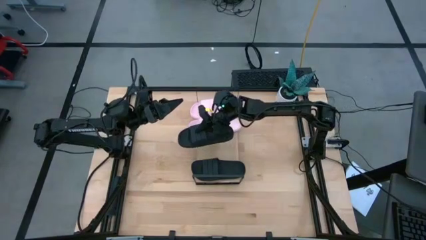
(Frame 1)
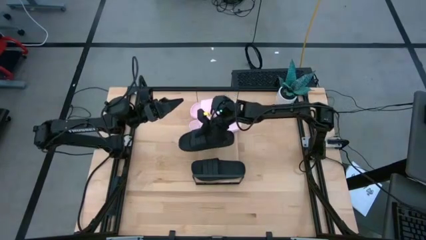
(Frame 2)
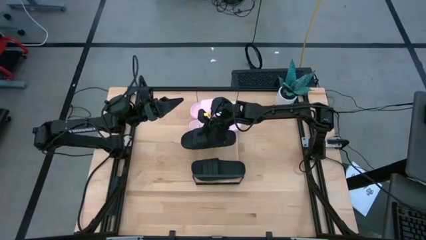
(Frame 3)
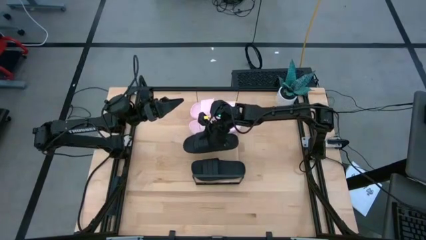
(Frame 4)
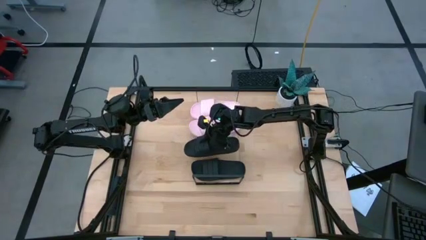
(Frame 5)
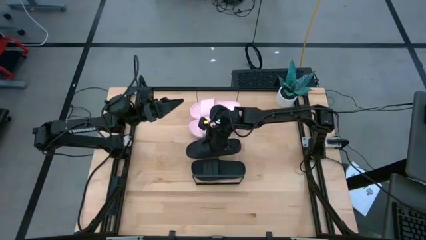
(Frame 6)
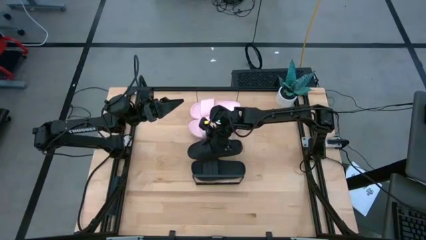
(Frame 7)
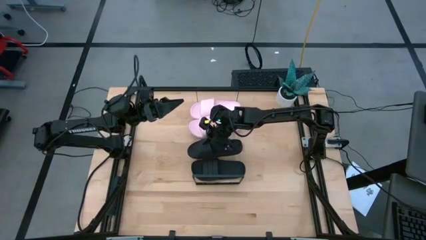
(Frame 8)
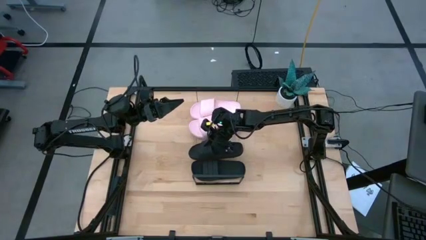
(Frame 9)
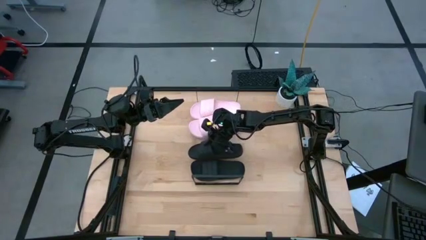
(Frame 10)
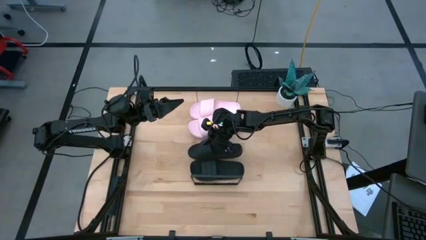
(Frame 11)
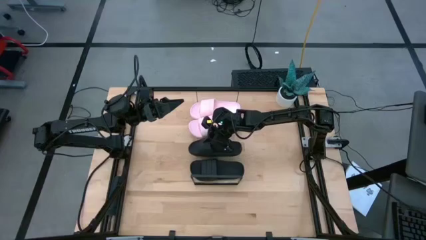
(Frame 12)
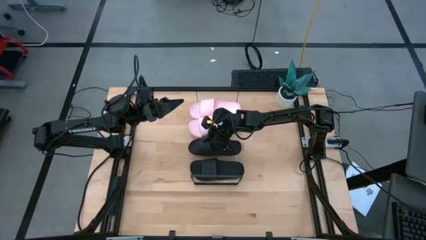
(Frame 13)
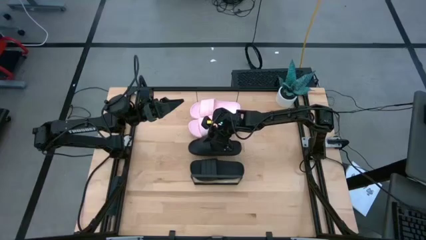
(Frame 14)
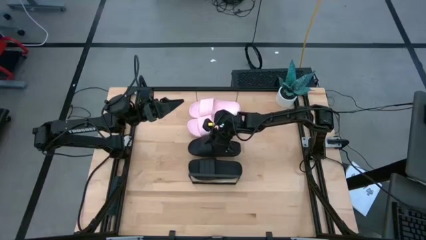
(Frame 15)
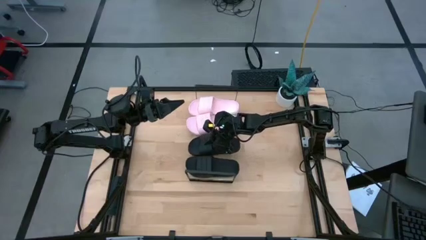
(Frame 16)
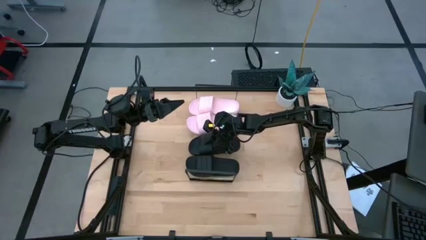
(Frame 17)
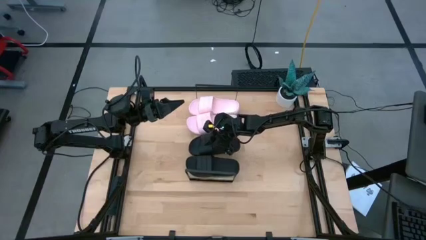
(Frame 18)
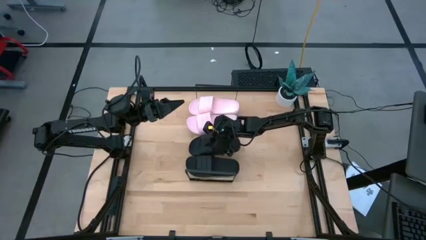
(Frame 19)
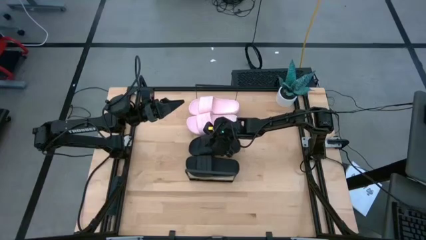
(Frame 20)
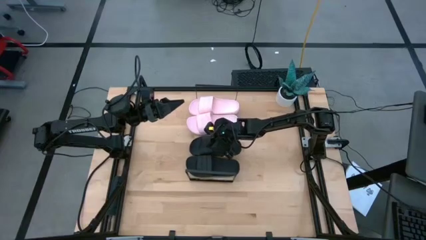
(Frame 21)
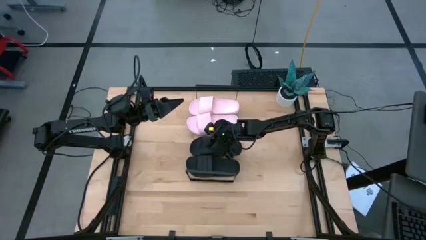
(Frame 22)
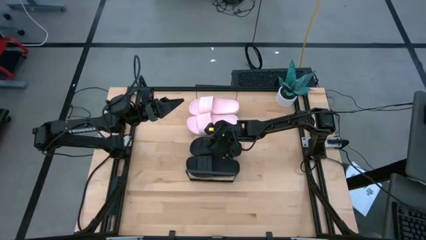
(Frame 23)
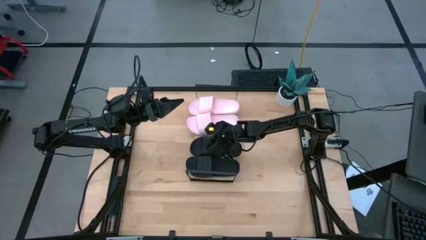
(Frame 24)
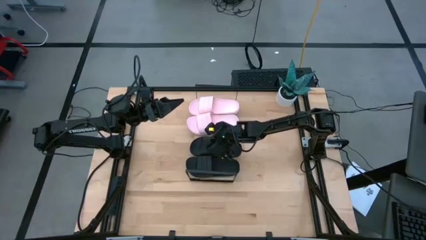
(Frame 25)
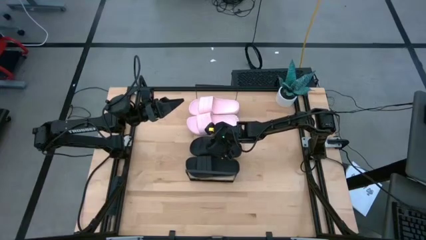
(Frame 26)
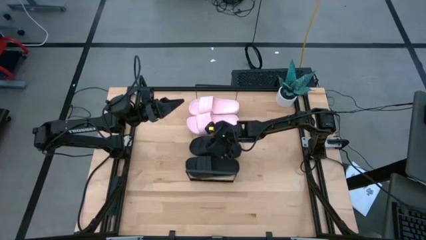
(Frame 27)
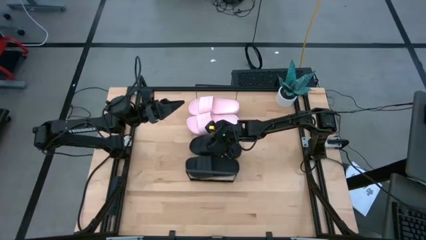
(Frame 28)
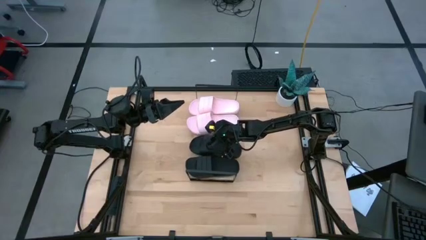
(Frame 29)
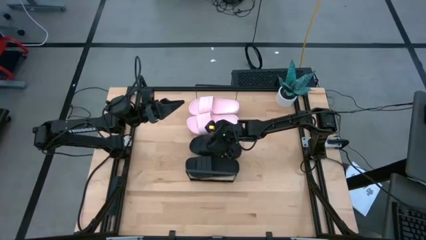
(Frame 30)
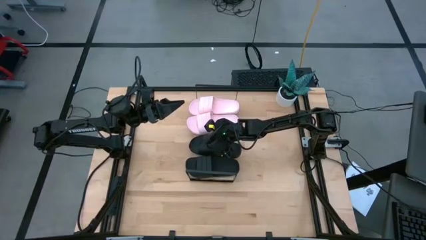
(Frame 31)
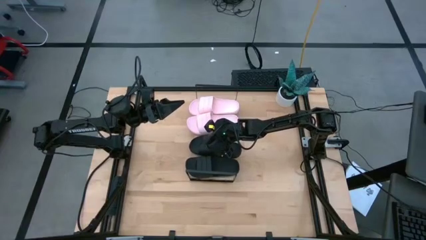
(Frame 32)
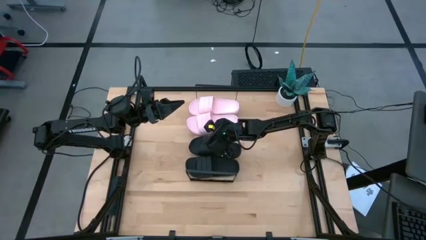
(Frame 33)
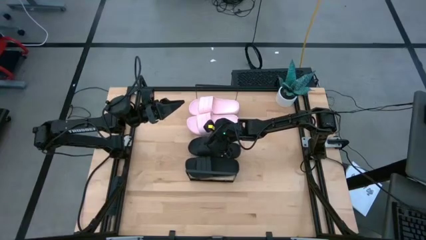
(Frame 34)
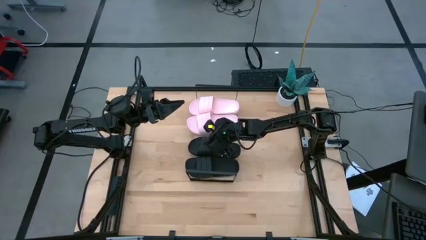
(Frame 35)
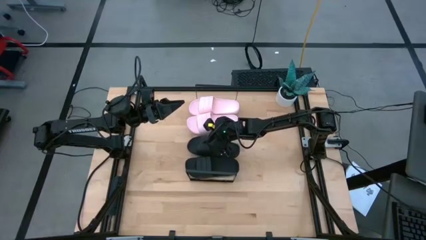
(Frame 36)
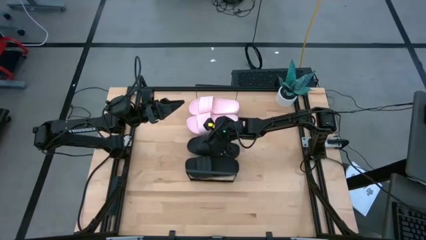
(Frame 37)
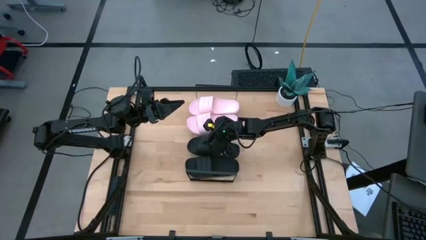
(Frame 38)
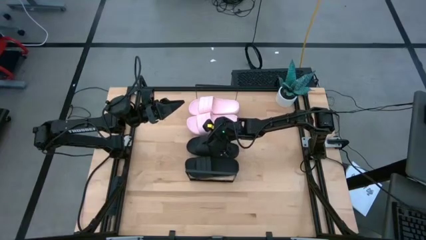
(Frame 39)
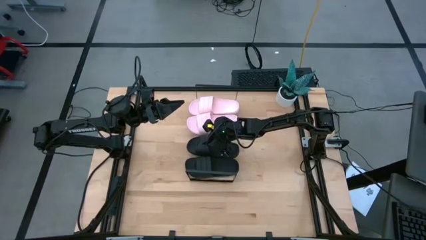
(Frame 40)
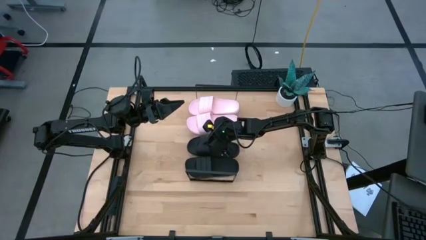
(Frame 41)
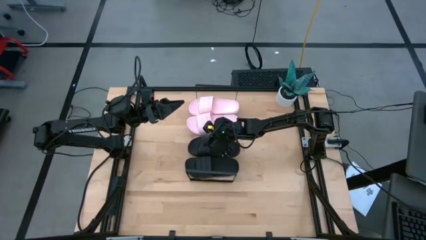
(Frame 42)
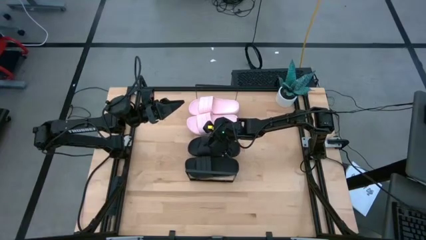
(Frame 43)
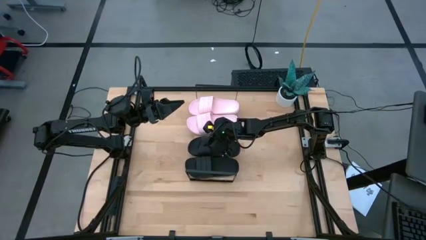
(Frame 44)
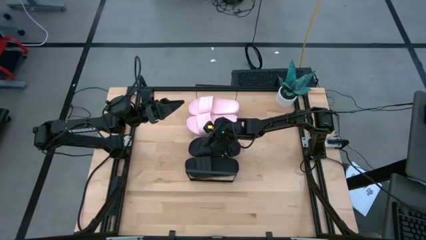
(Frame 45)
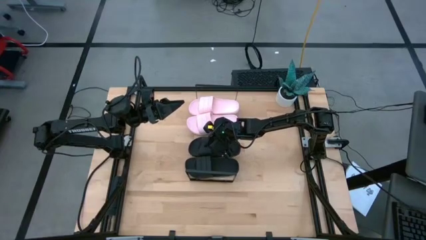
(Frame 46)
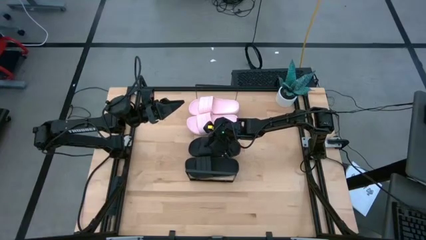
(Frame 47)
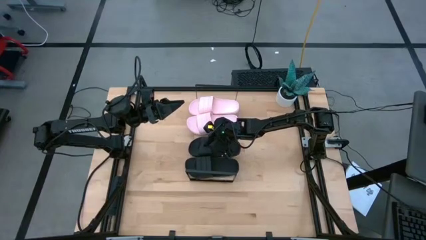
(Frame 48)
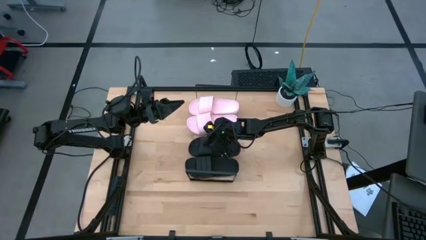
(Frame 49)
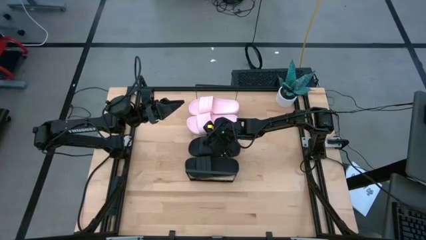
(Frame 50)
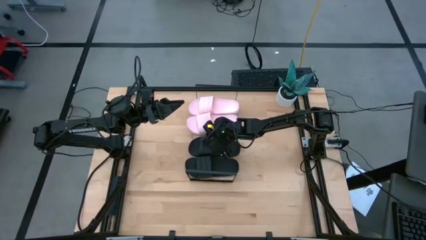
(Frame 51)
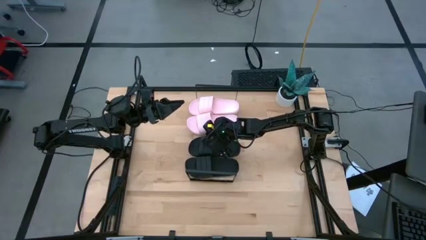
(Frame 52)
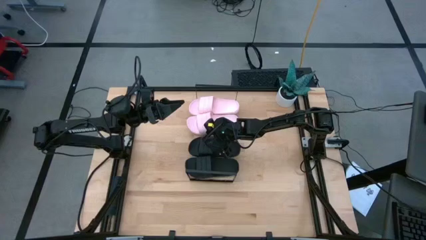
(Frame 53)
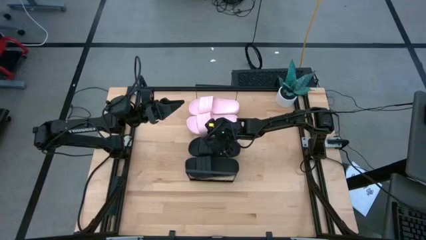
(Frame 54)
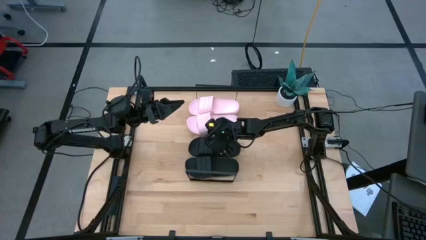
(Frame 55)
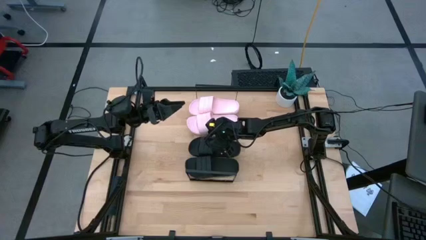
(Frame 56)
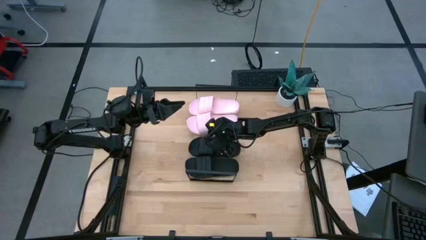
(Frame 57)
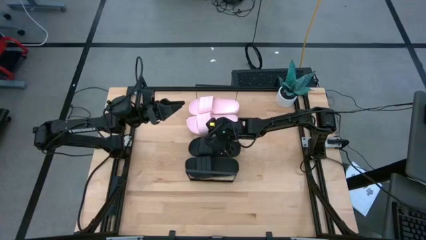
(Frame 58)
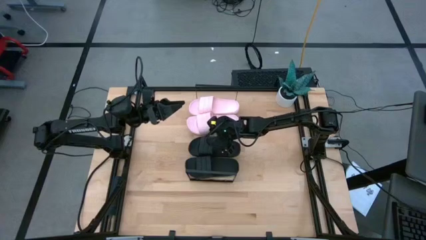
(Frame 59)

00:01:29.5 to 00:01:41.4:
Task: Pick and place slides into the shelf
Put the black slide on the shelf

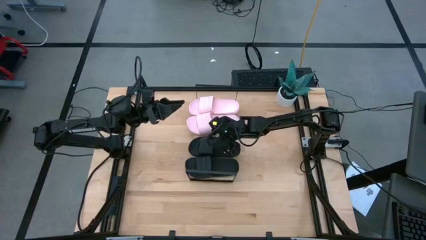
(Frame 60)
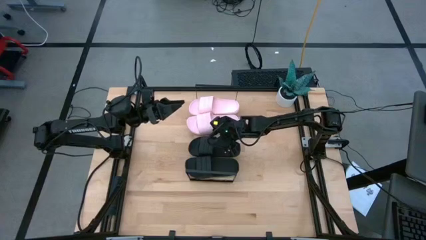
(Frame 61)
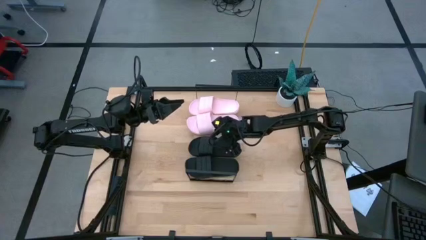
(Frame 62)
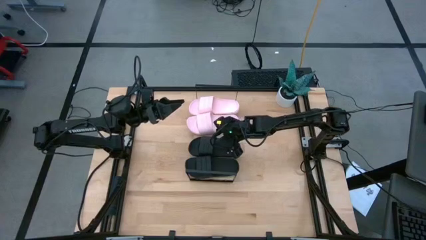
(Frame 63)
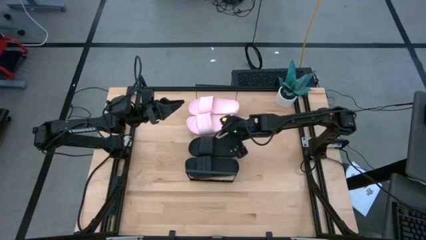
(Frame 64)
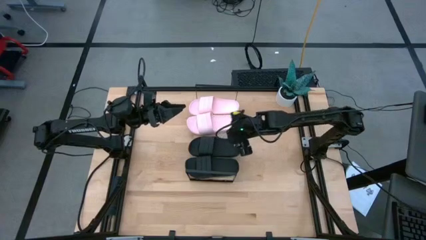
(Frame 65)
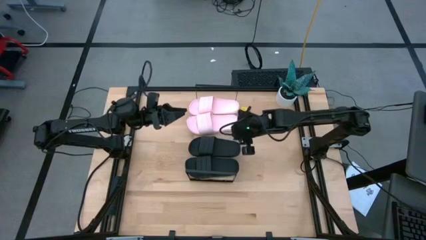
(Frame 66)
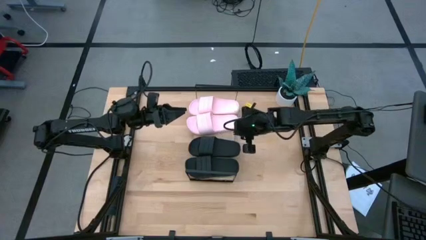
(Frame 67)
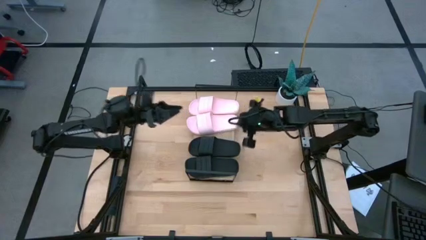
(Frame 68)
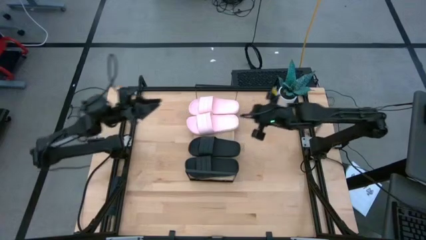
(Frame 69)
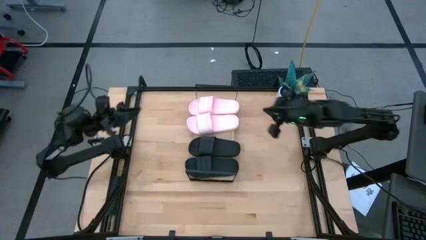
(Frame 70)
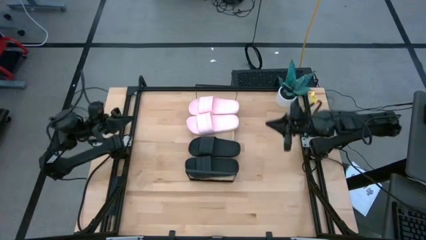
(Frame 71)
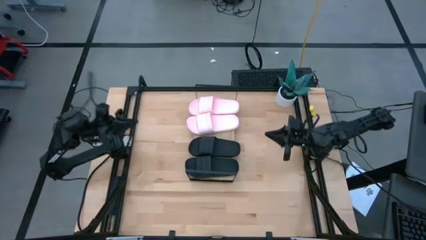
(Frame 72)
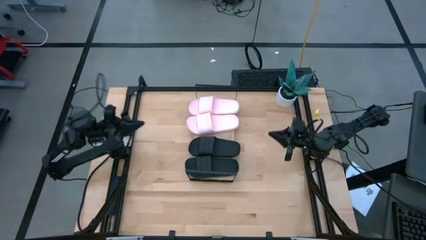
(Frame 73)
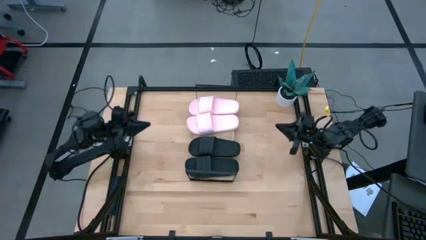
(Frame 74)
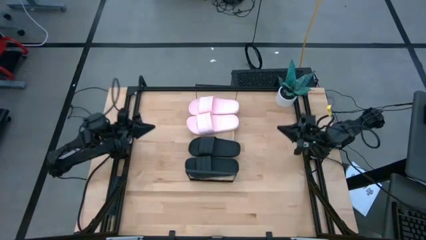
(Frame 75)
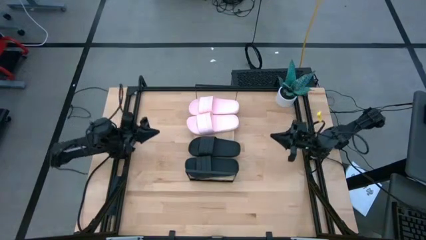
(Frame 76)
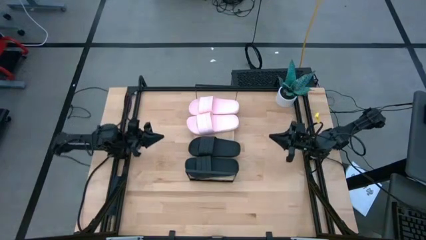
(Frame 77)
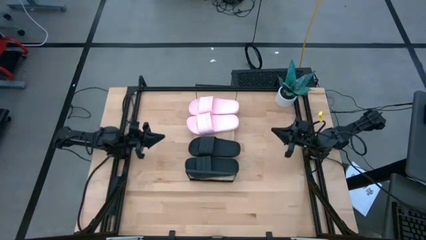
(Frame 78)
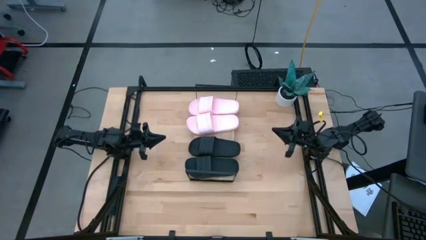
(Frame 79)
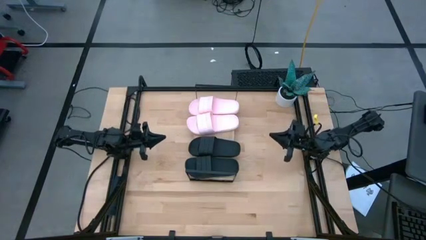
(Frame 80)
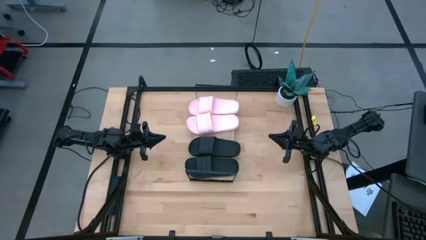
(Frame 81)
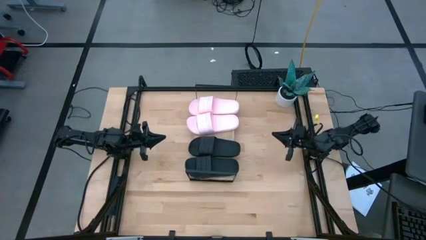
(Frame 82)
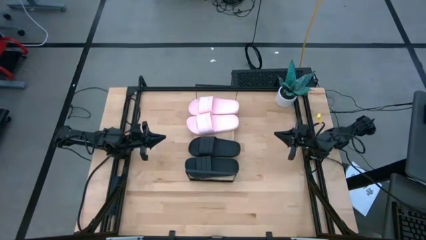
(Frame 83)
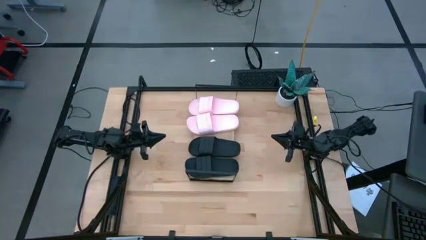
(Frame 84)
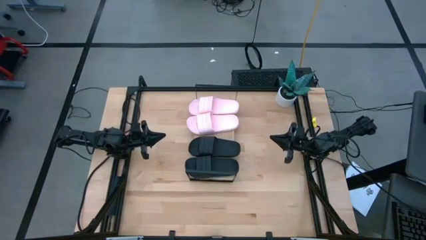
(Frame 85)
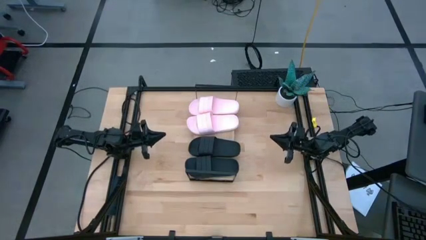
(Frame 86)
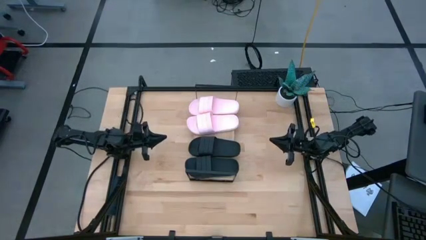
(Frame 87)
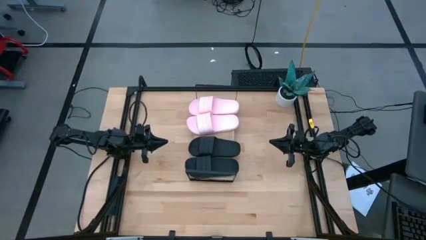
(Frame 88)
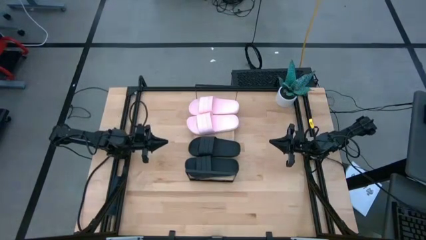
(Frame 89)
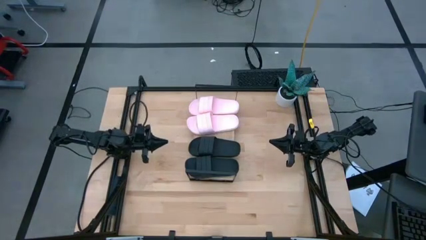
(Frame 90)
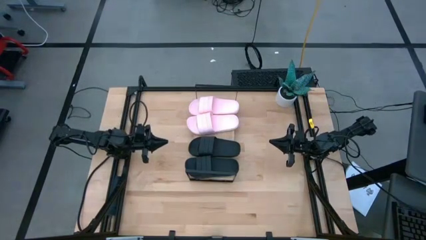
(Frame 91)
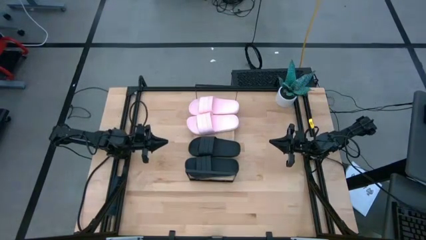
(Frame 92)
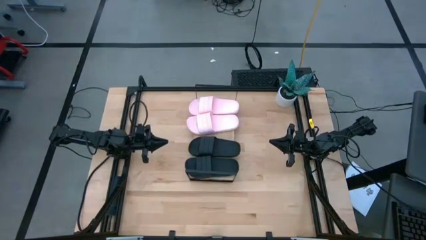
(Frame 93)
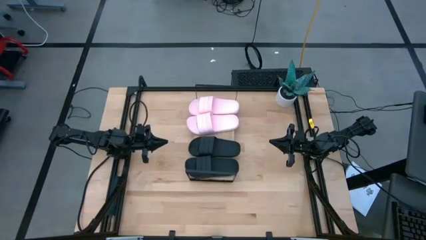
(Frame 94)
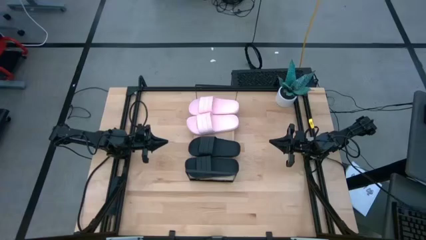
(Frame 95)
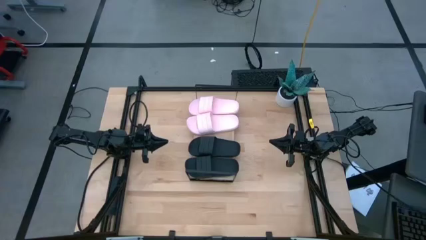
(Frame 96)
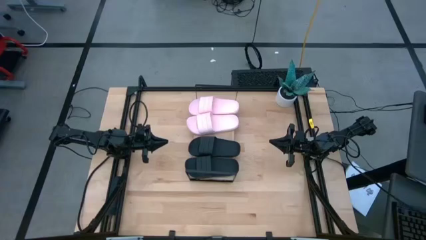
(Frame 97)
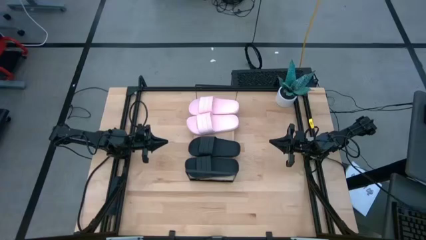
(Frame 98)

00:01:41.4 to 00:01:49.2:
Return to Home Position
